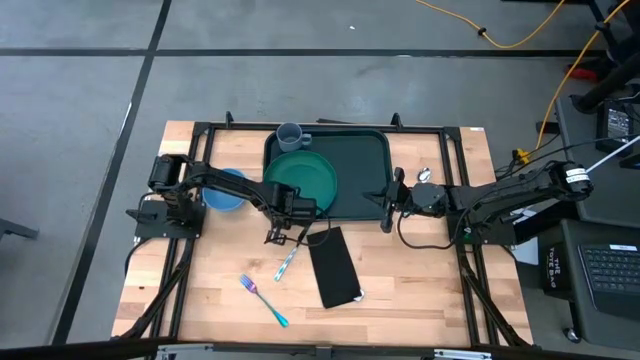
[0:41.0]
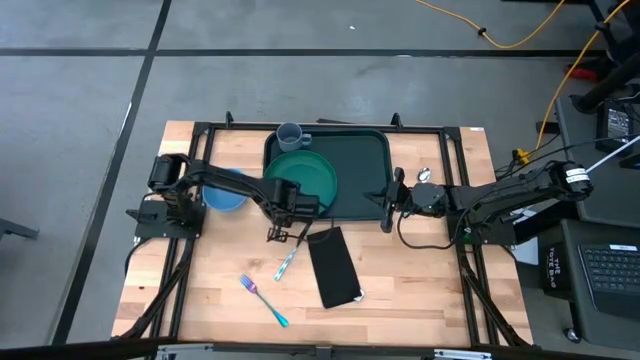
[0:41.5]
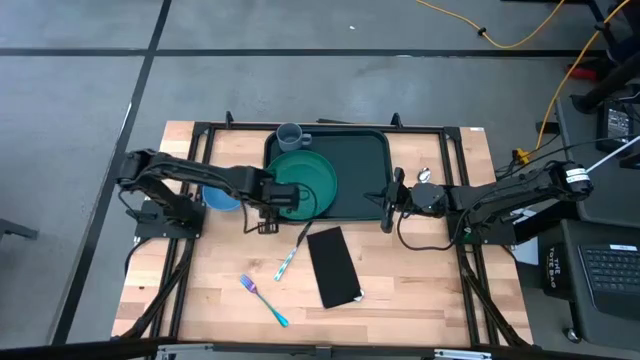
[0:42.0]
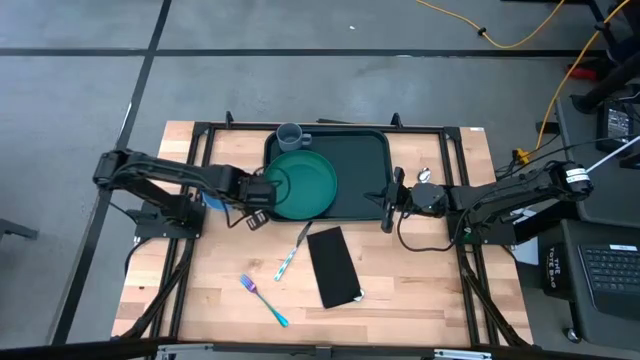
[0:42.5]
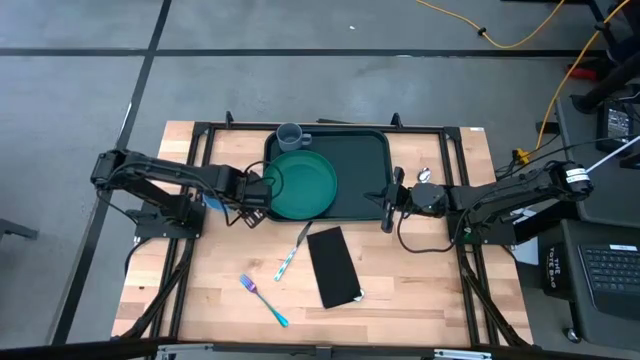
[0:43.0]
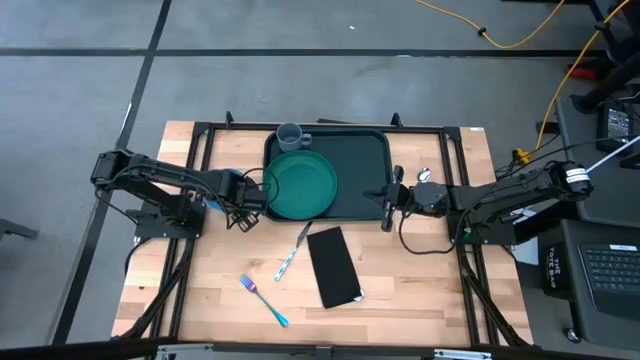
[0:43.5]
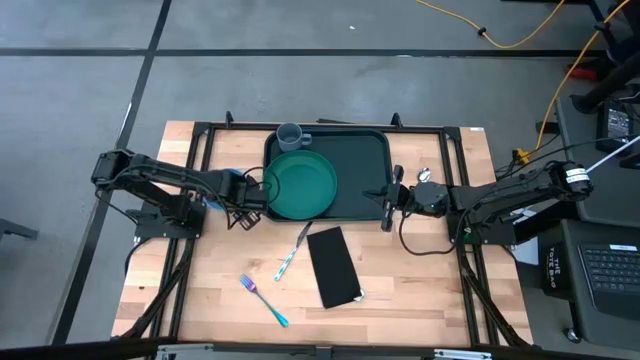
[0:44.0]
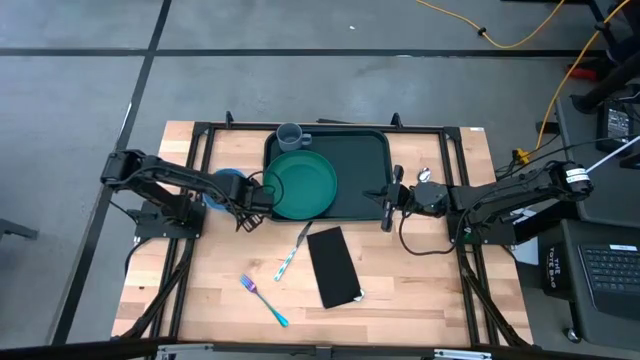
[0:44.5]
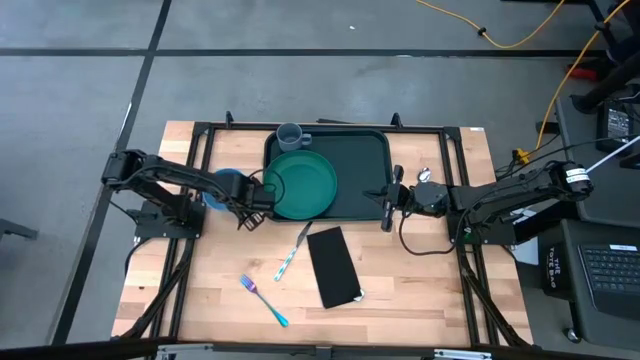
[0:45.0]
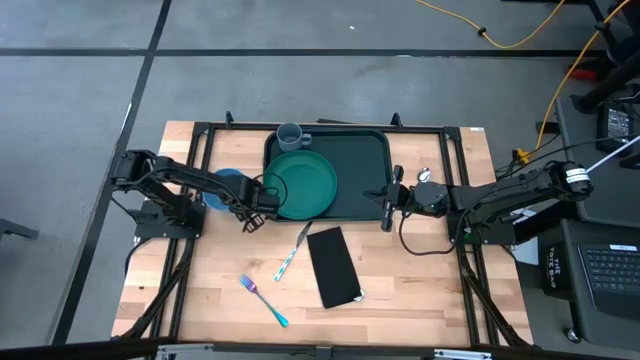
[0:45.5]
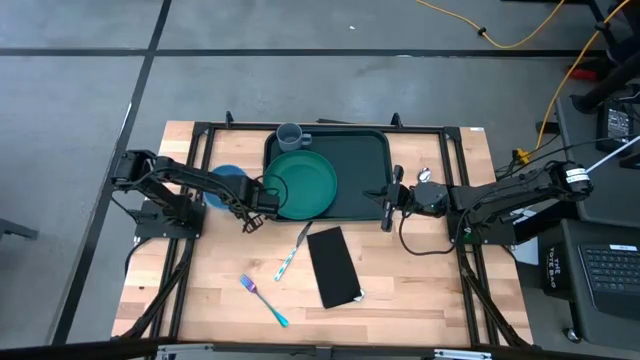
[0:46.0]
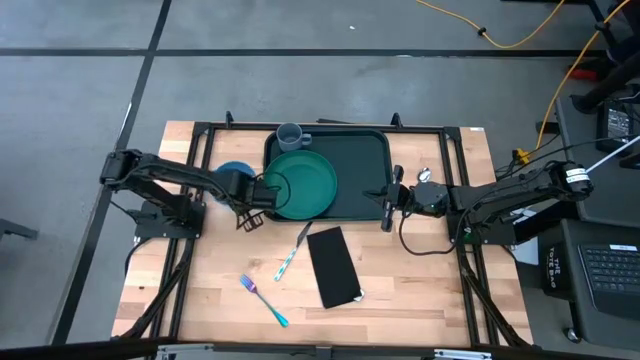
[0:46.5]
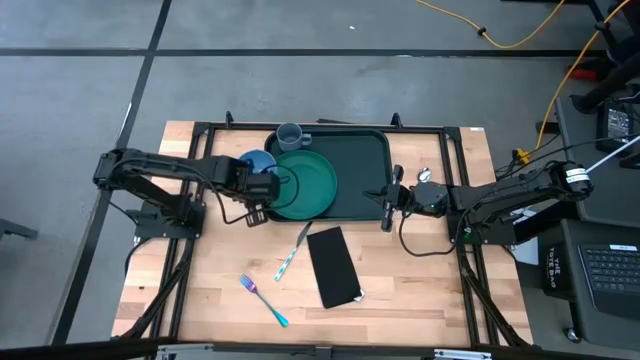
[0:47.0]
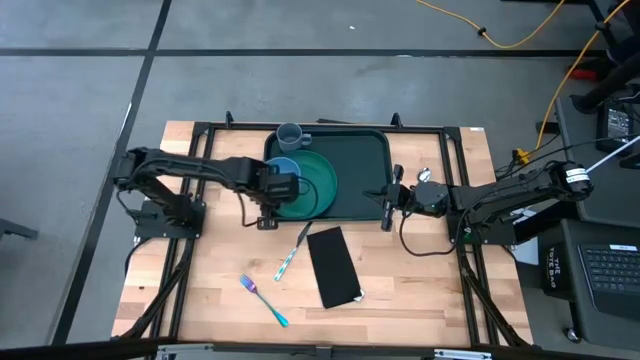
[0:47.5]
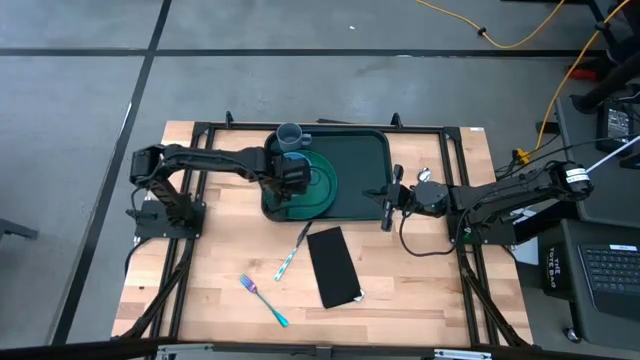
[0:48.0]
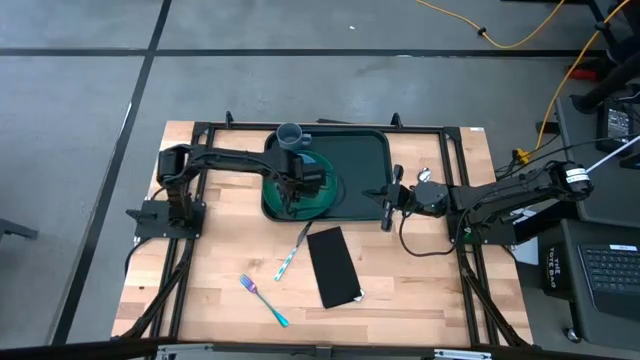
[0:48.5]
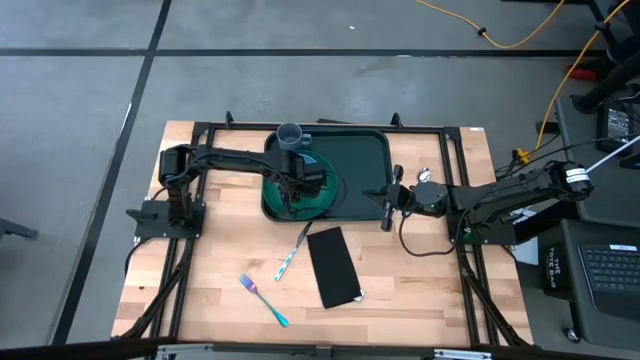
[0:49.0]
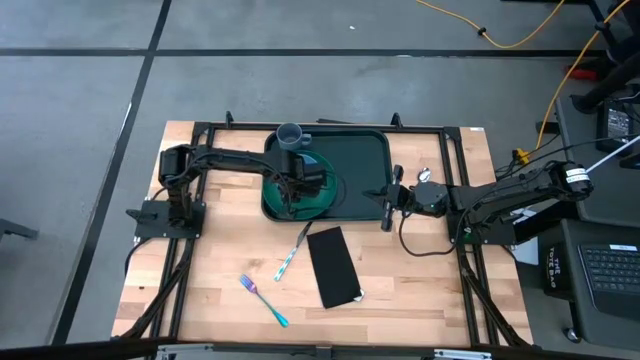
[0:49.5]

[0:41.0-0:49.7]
Task: Set up tray
Put the bowl on top of the plate on the tray

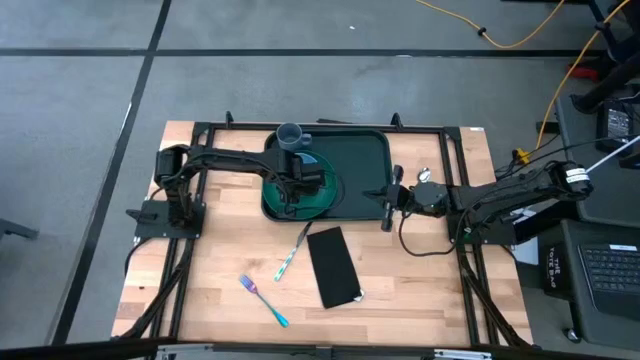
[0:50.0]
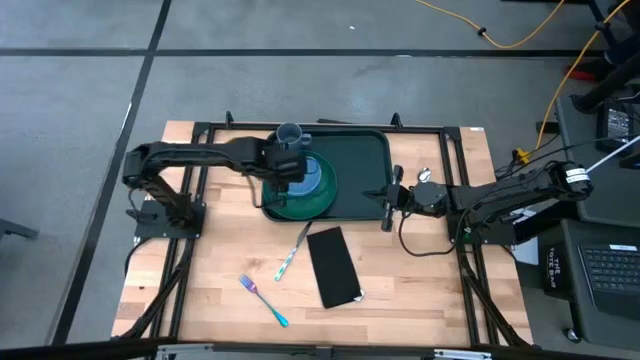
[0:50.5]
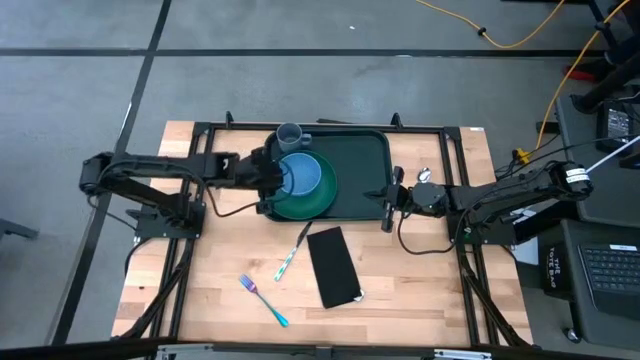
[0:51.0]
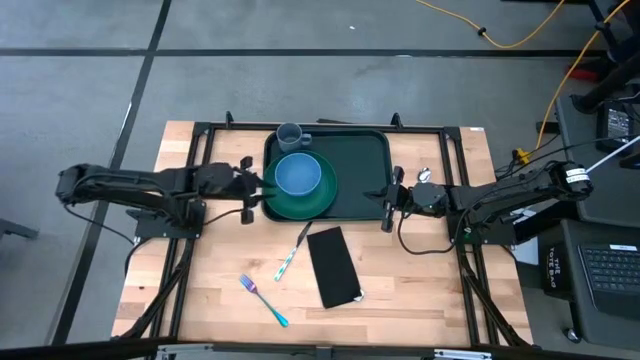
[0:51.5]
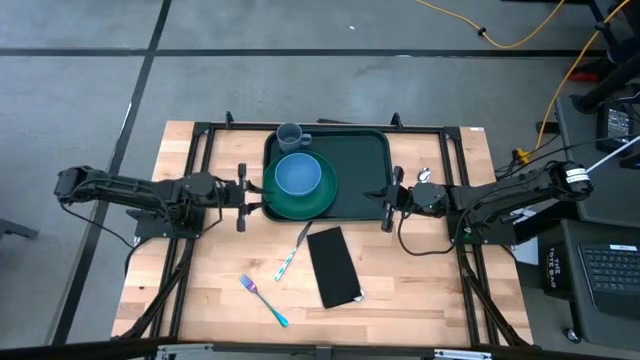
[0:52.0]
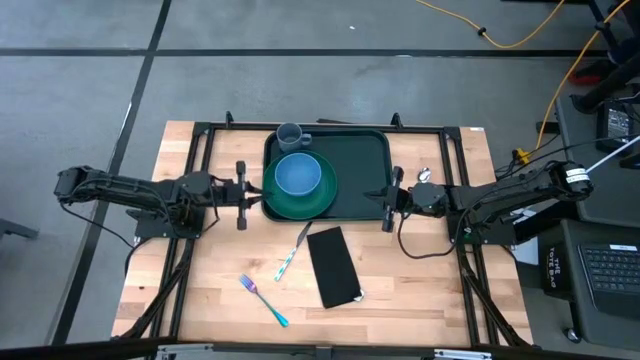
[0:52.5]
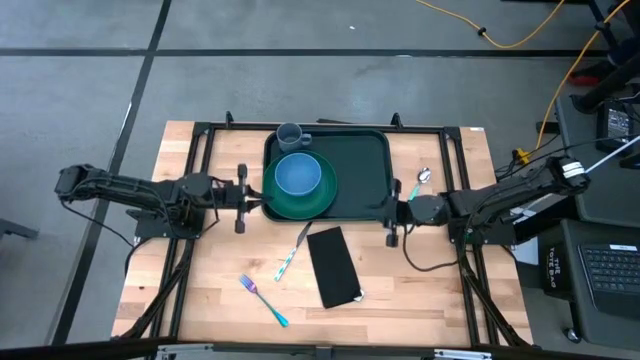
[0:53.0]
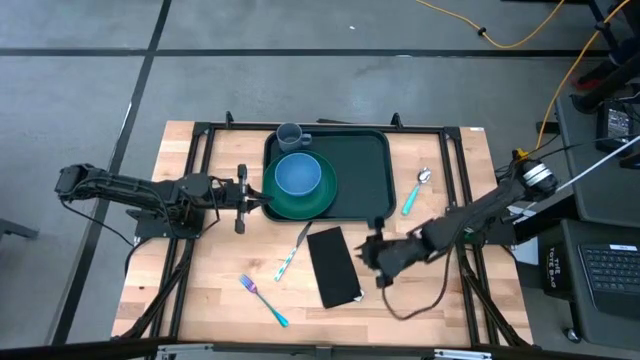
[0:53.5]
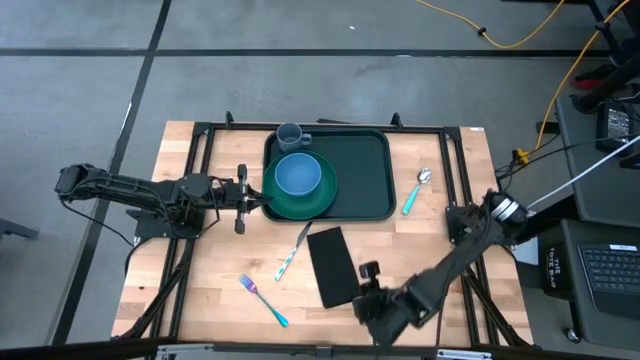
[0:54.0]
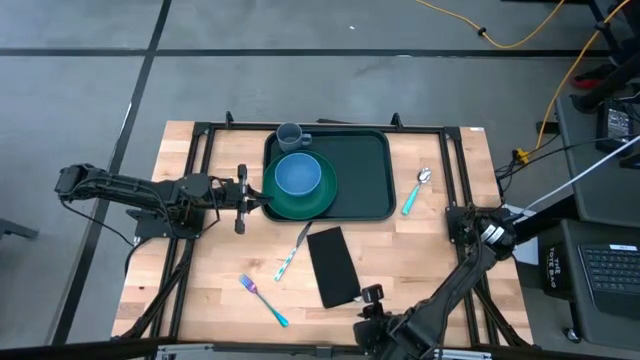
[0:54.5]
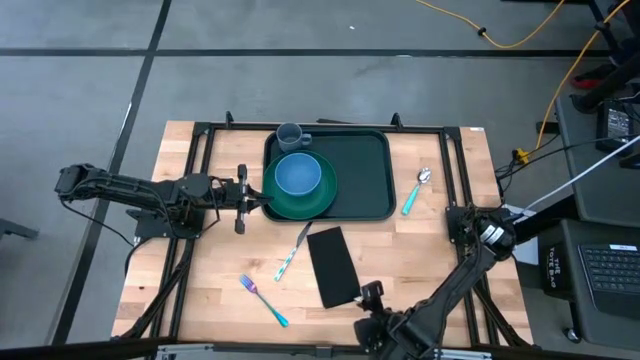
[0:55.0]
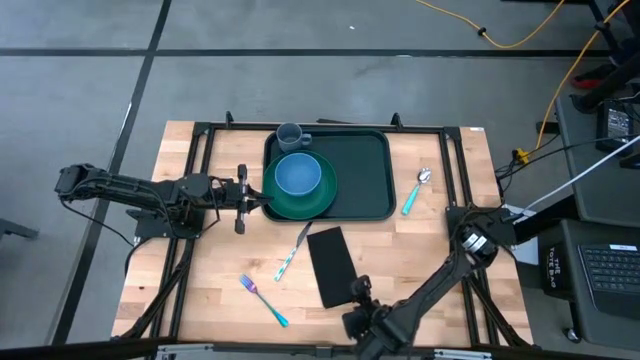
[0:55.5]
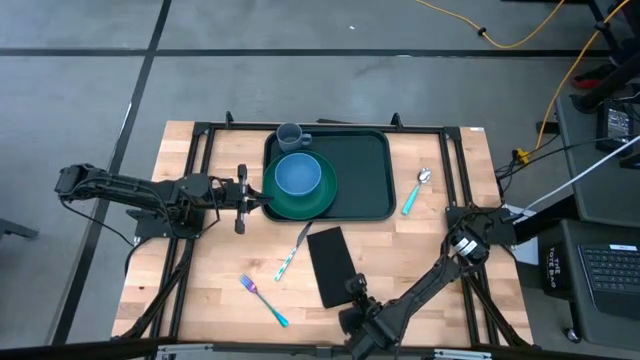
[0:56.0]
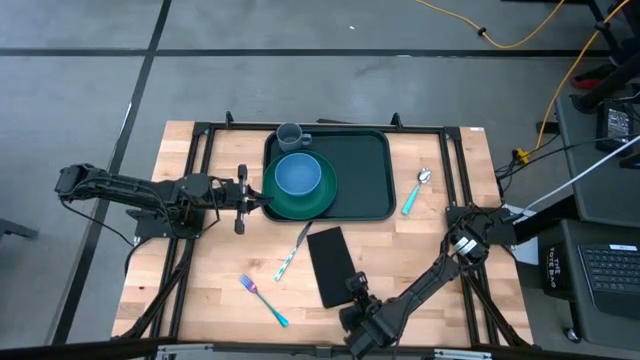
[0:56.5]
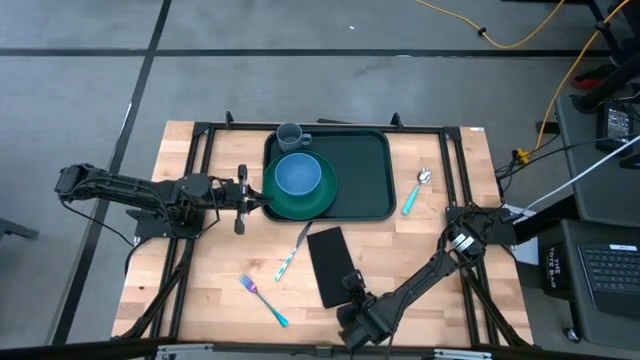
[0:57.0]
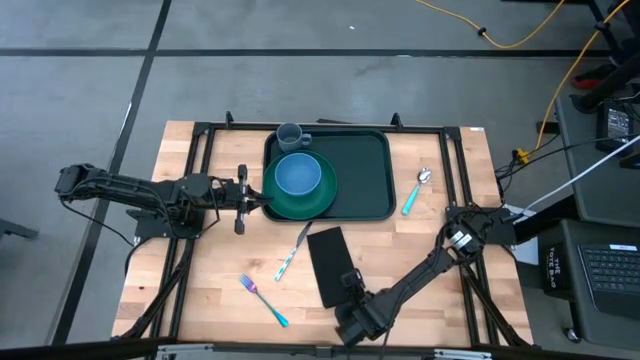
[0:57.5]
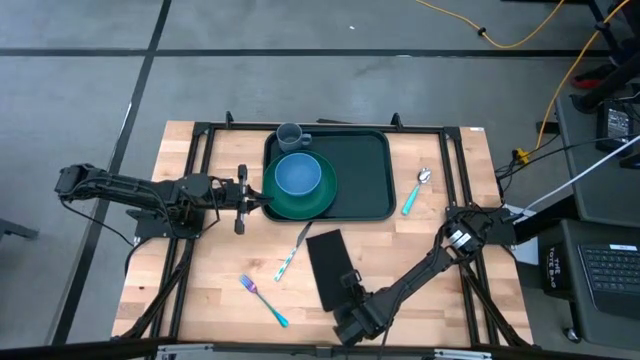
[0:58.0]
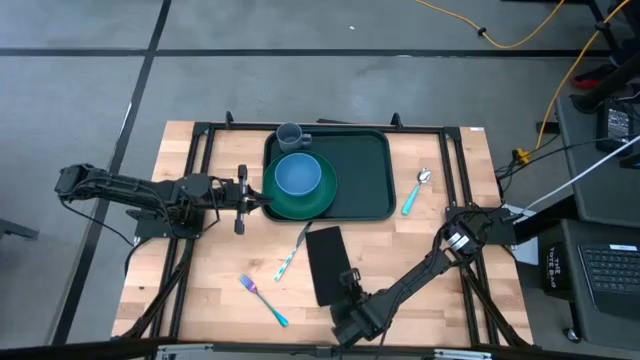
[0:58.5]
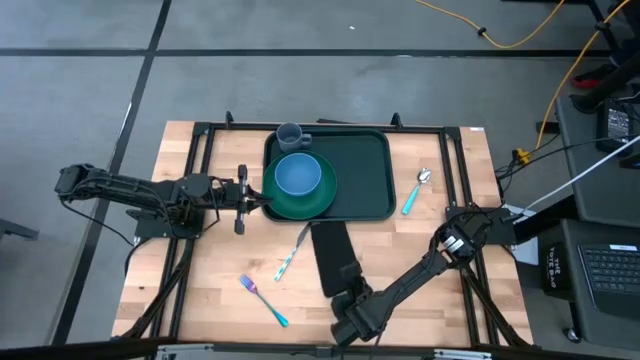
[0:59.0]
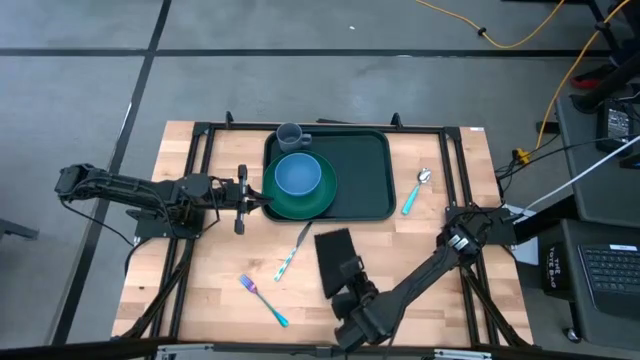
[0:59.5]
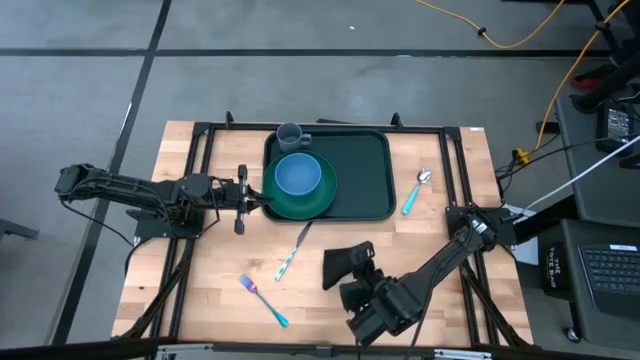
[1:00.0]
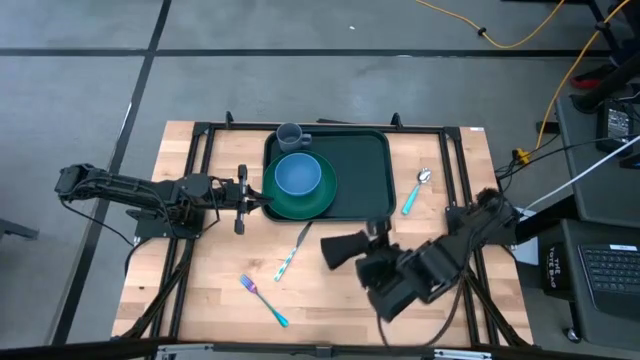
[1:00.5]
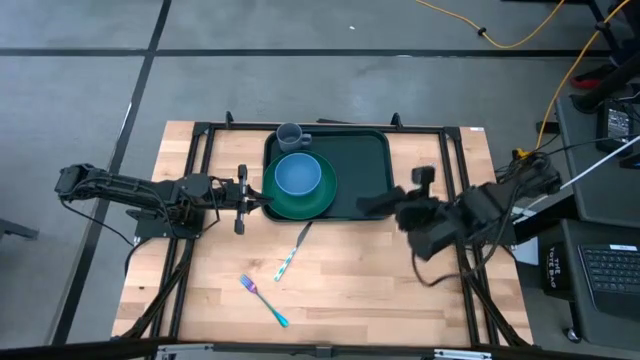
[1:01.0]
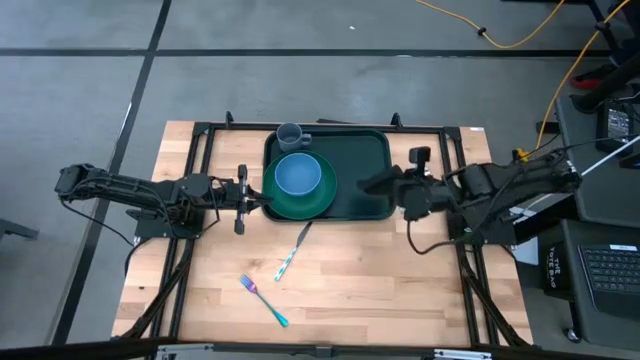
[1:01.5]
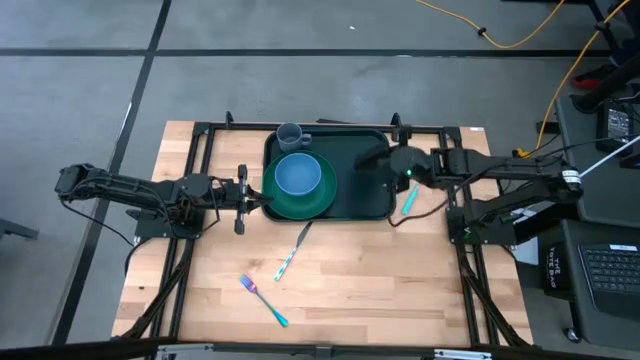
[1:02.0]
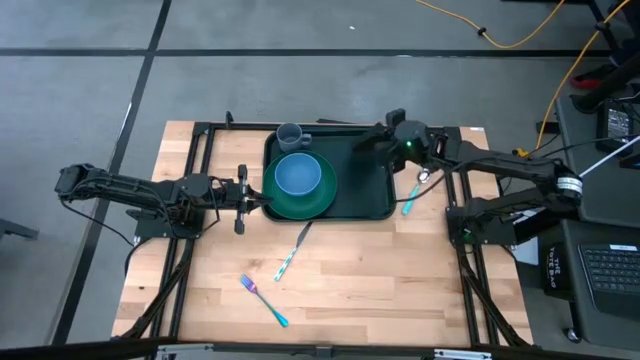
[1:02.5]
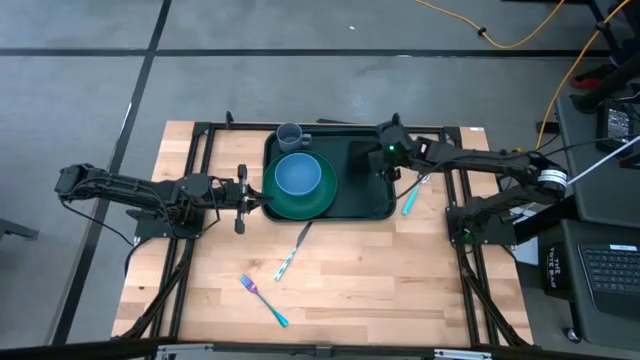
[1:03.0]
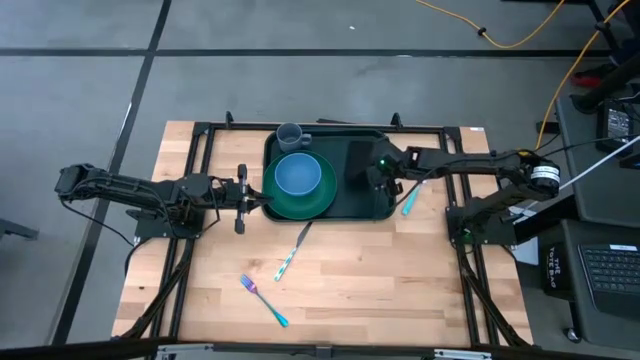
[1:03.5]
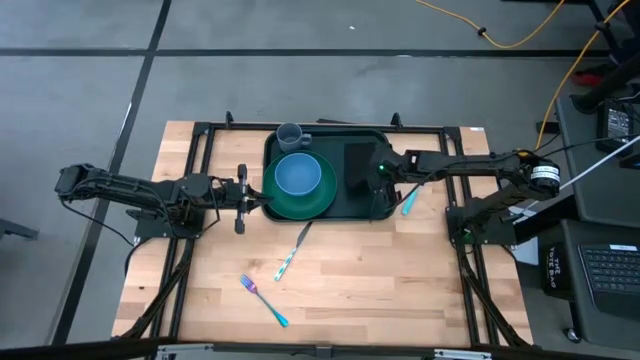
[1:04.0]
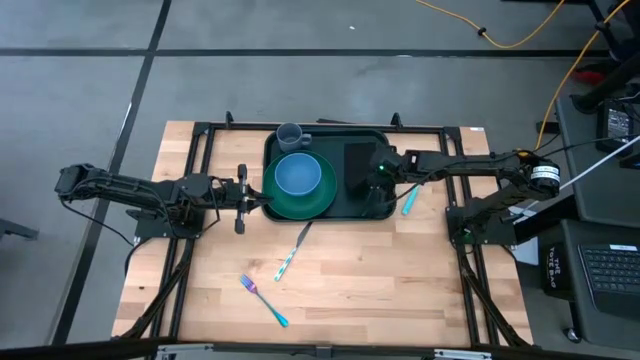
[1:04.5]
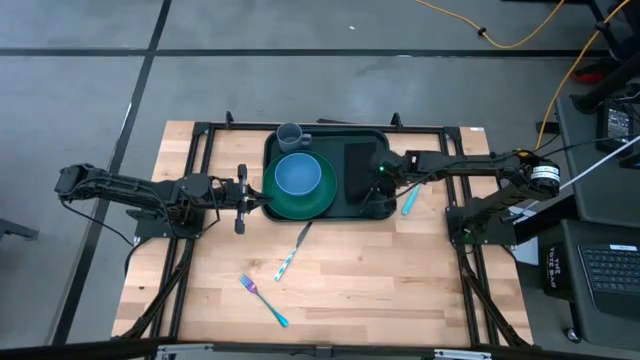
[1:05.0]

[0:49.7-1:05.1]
Put the napkin on the tray
